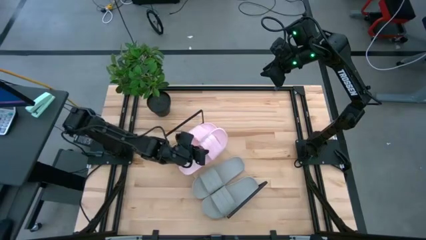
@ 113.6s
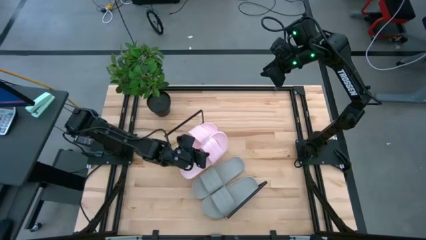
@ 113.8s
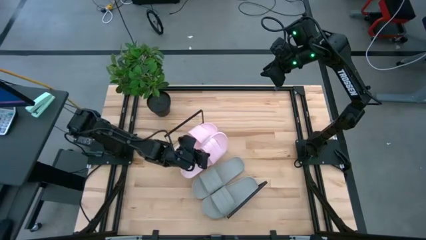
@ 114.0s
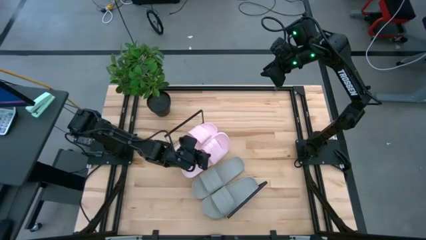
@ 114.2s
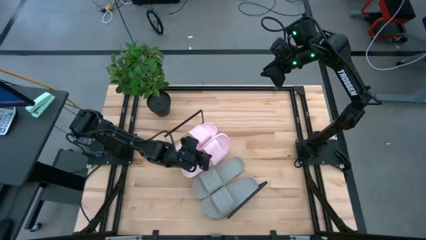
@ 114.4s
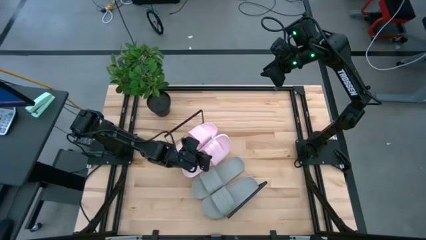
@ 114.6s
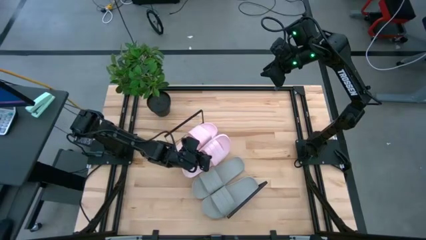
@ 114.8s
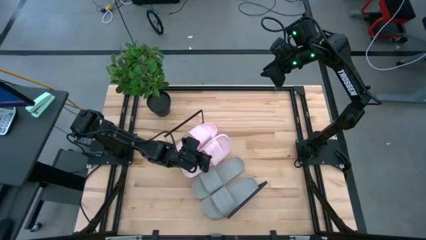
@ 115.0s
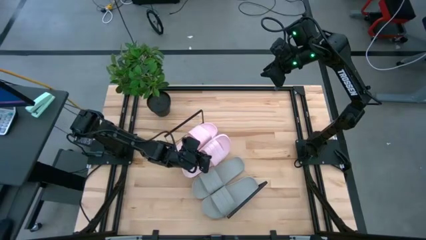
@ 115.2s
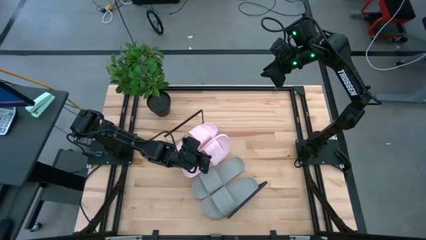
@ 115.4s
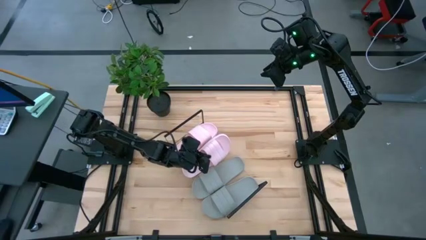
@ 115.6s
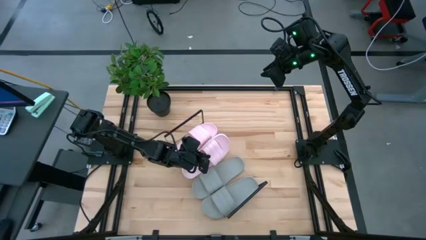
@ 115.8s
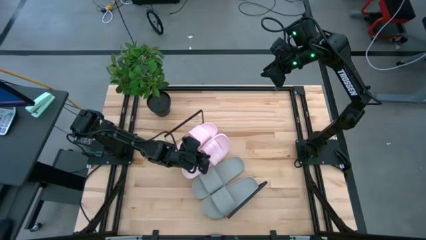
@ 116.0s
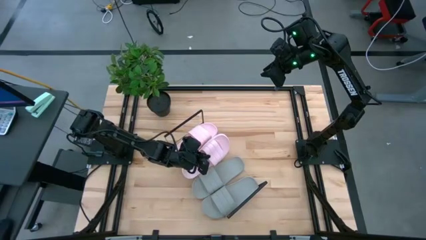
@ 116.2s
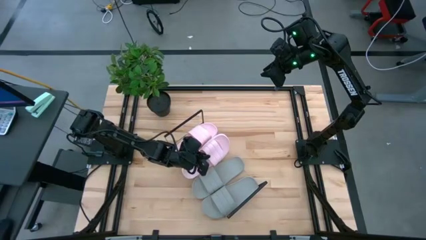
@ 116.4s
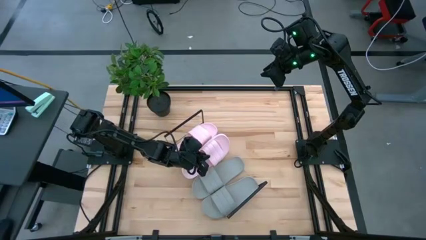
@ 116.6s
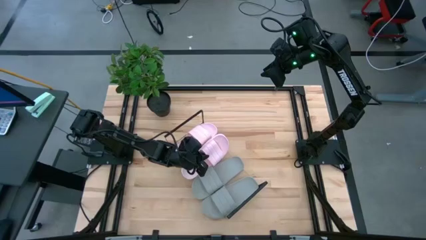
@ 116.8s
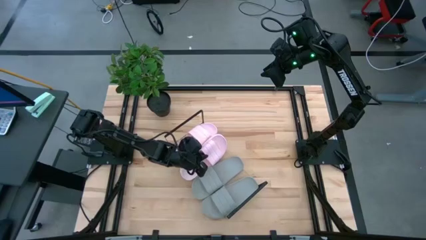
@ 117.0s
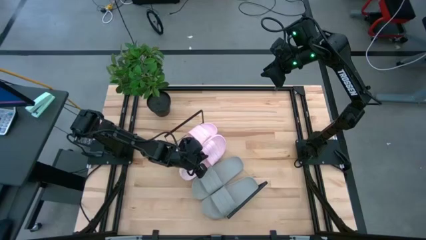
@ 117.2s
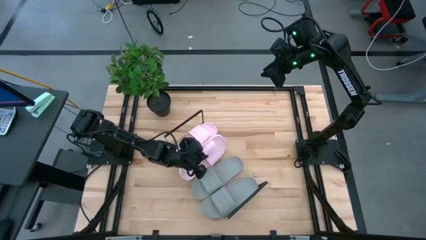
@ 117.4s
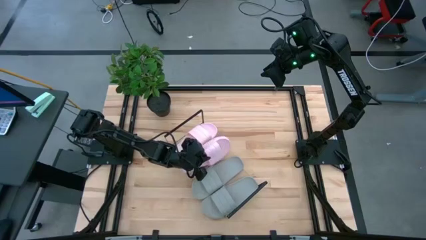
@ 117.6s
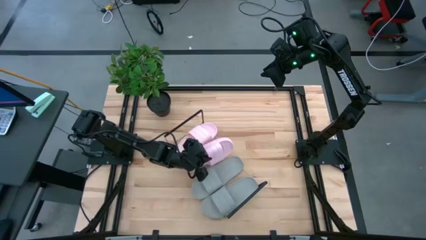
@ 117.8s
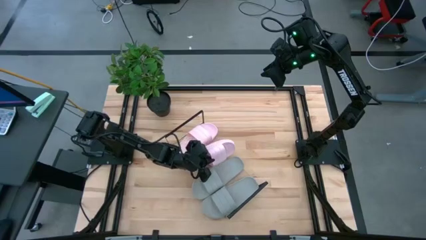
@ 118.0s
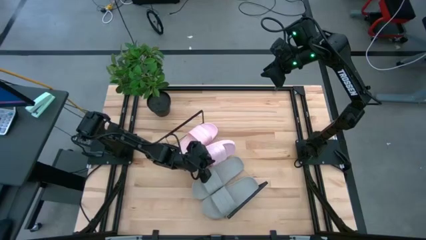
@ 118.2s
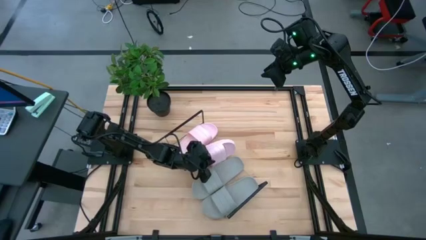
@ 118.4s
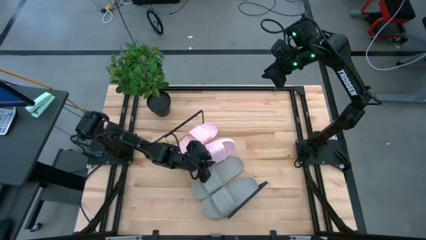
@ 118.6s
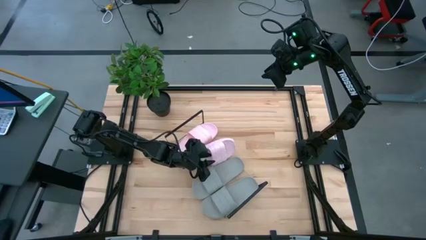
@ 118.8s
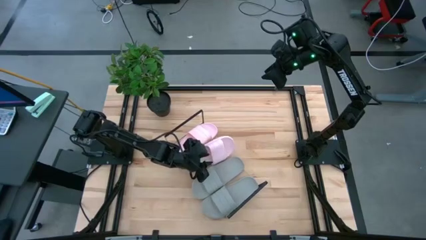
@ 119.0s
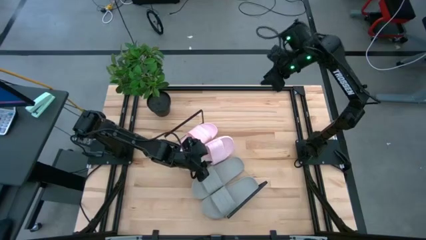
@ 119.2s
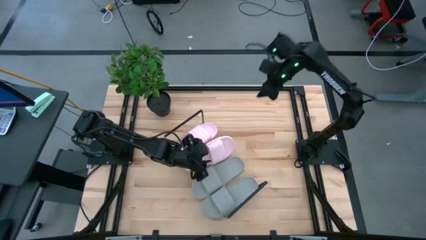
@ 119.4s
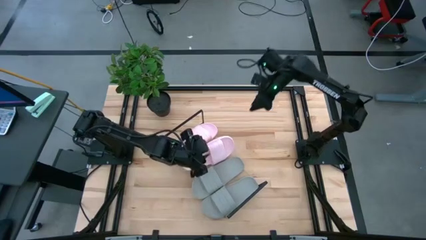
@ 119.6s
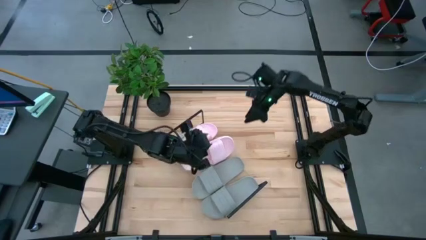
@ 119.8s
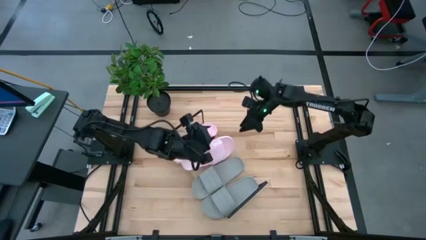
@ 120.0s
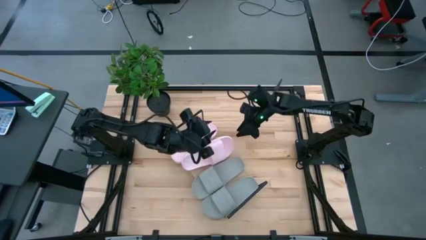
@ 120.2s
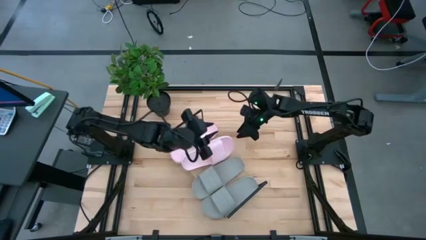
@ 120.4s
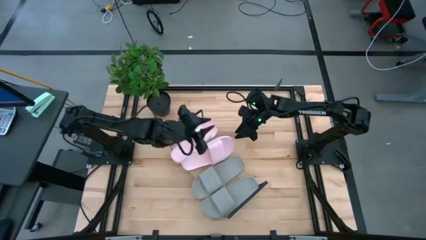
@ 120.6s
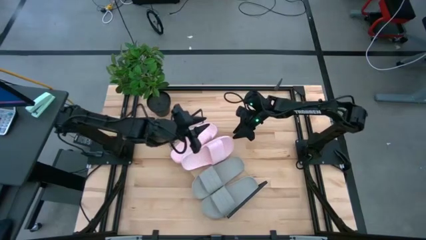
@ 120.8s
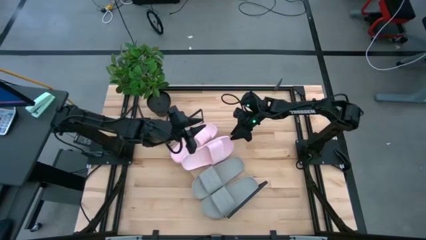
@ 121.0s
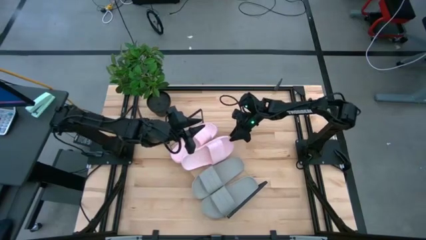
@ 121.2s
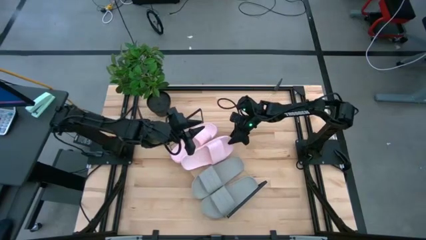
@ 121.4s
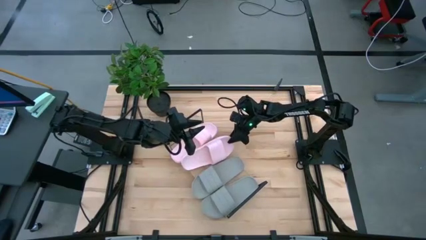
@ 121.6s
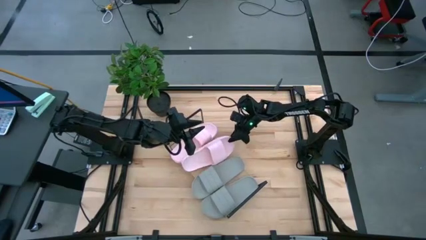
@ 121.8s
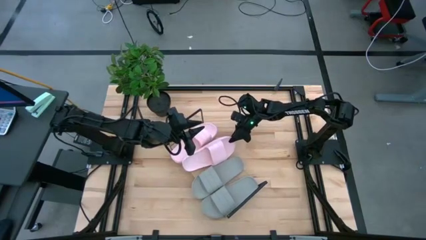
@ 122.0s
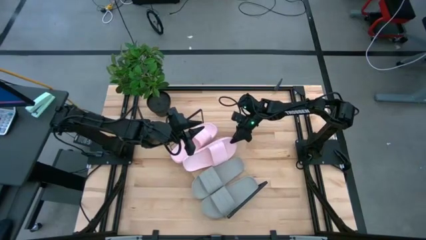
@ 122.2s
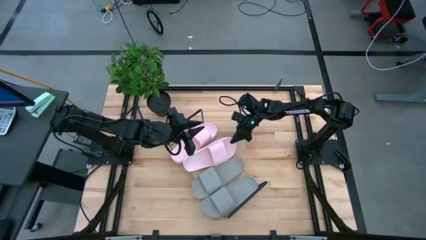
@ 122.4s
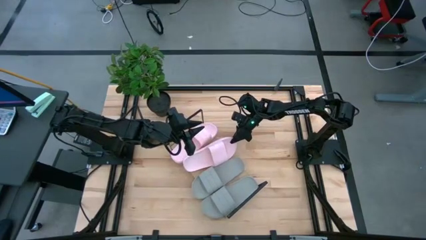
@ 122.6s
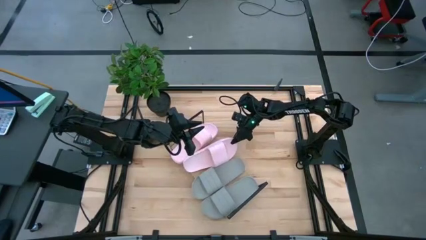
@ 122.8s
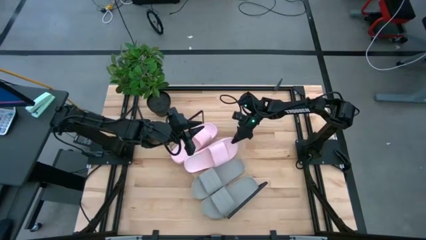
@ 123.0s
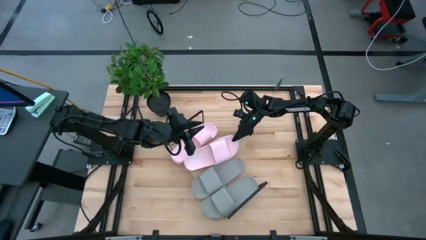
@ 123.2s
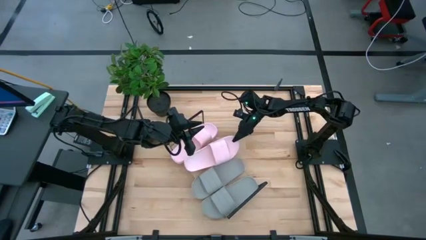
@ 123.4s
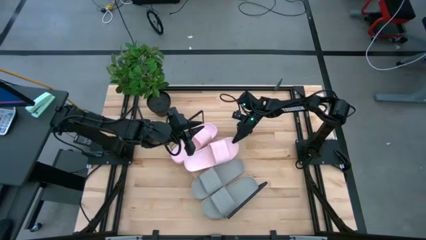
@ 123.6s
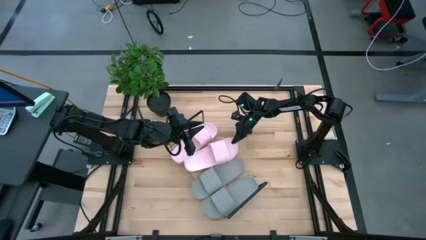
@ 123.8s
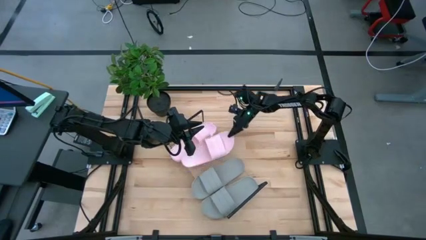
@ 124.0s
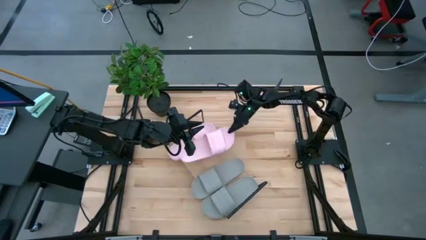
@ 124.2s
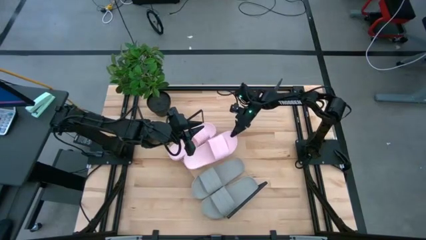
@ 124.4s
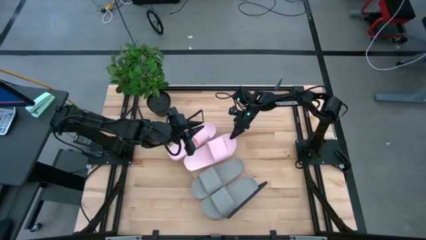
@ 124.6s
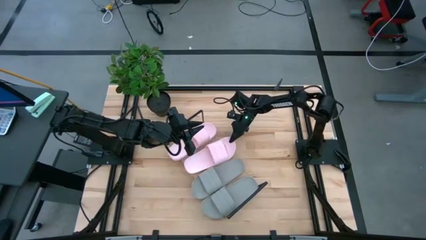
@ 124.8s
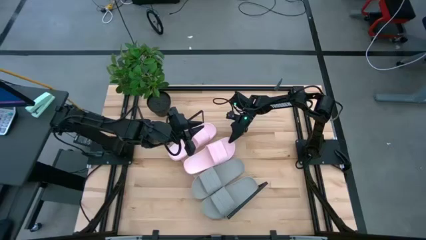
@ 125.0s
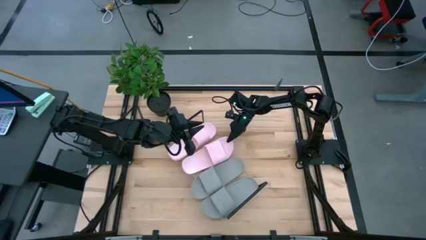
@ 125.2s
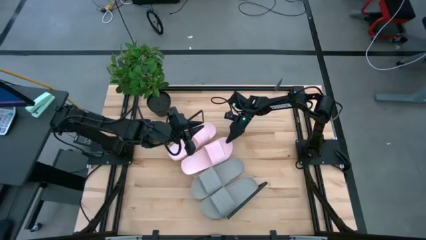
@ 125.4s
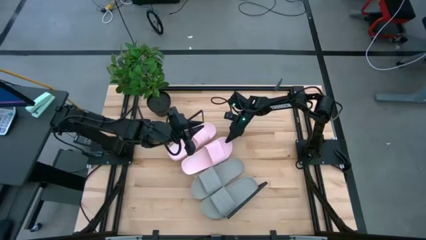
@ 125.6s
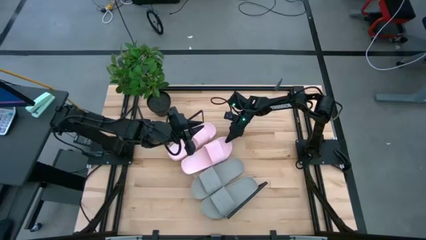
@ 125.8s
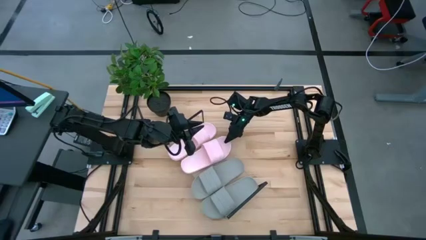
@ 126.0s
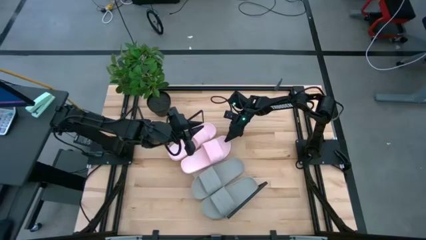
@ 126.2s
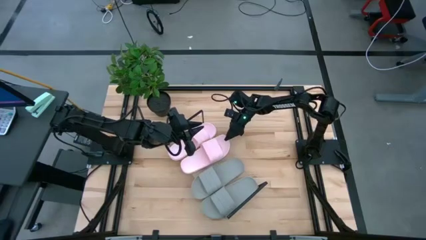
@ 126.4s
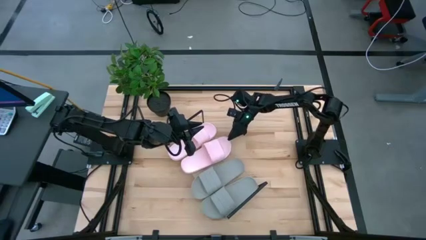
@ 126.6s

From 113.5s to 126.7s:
Task: Pick and place slides into the shelf
Put the pink slide on the shelf
